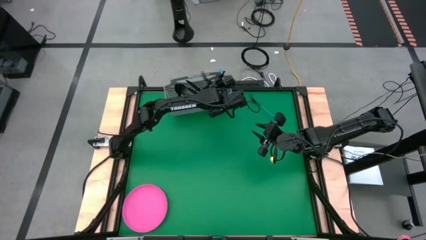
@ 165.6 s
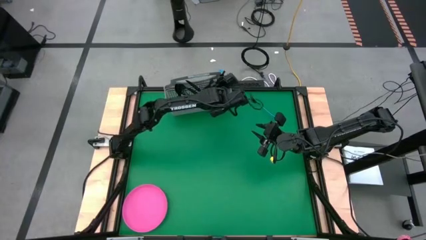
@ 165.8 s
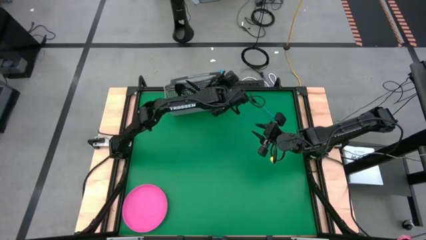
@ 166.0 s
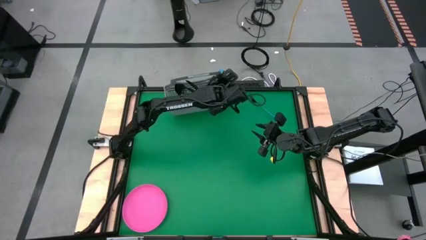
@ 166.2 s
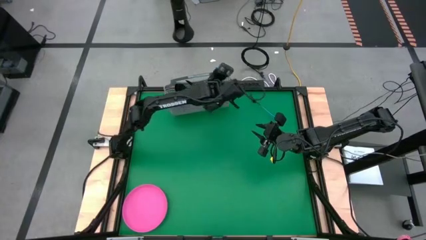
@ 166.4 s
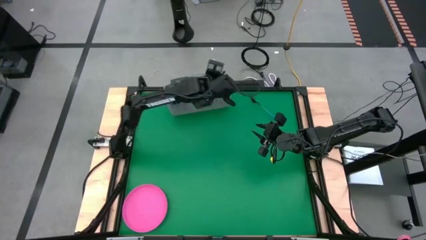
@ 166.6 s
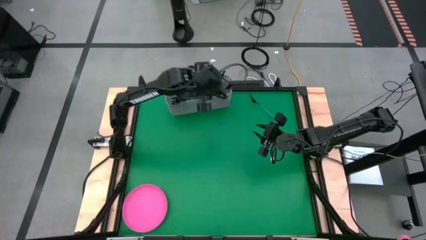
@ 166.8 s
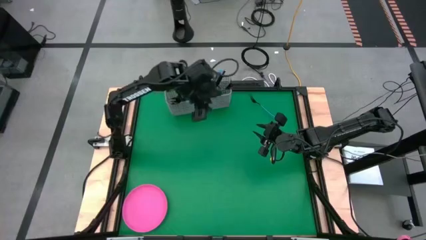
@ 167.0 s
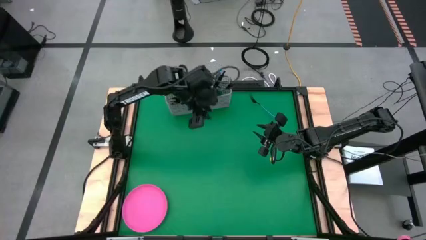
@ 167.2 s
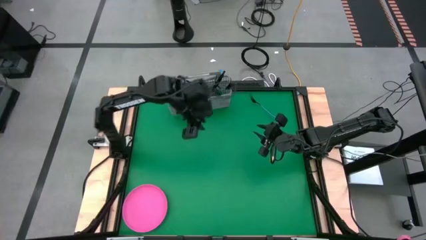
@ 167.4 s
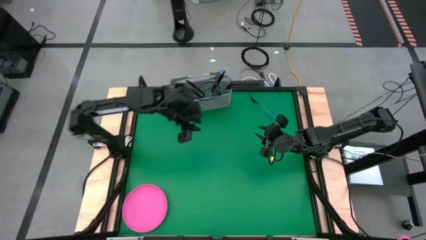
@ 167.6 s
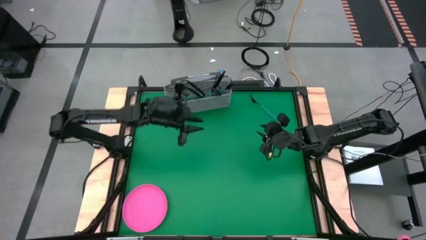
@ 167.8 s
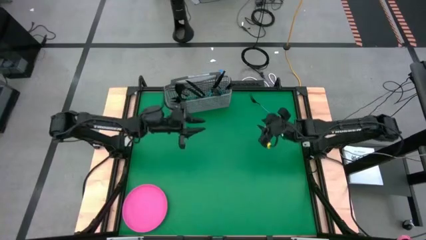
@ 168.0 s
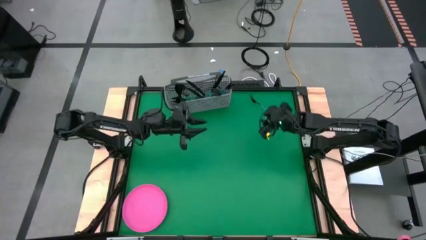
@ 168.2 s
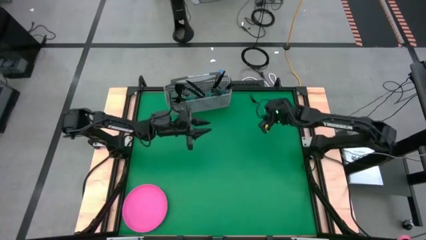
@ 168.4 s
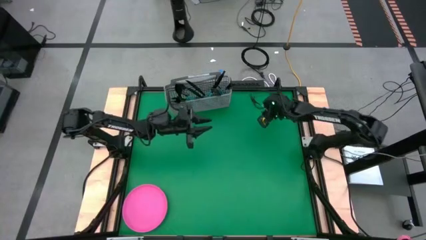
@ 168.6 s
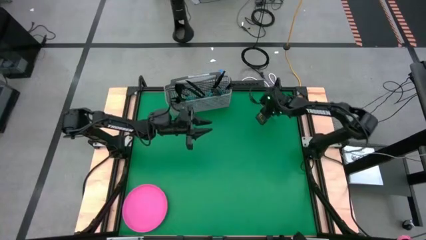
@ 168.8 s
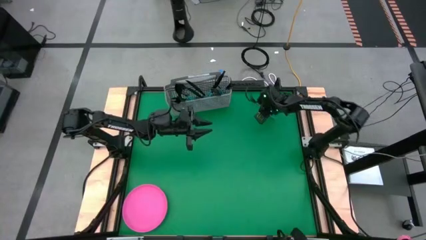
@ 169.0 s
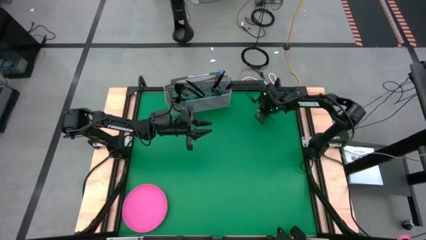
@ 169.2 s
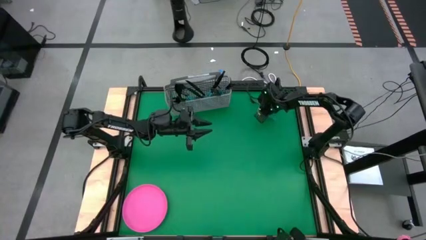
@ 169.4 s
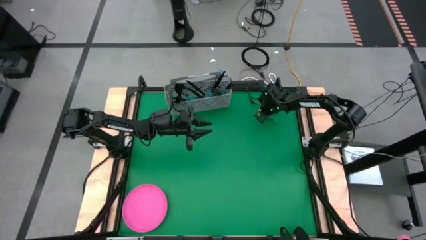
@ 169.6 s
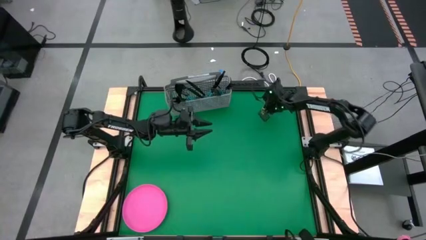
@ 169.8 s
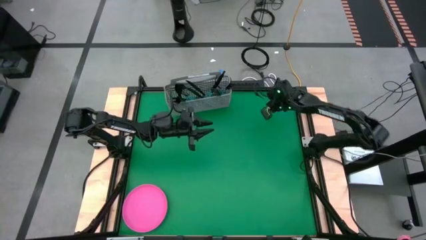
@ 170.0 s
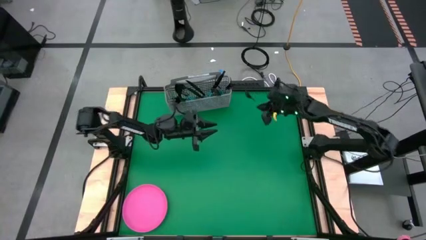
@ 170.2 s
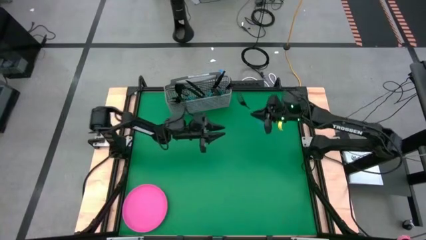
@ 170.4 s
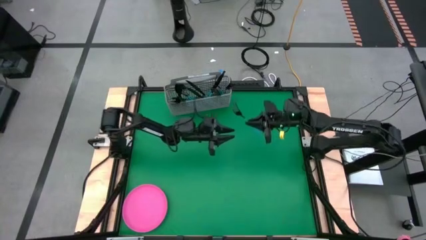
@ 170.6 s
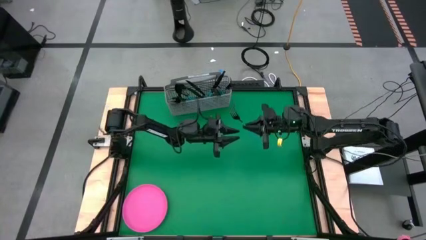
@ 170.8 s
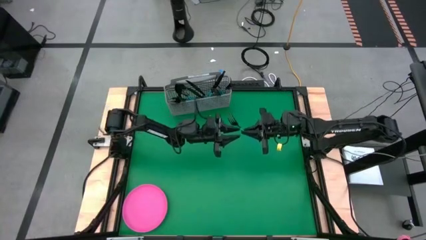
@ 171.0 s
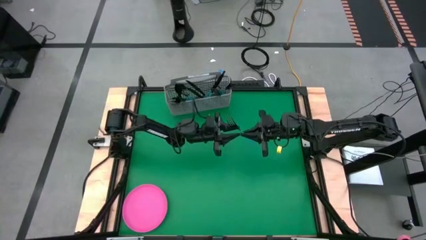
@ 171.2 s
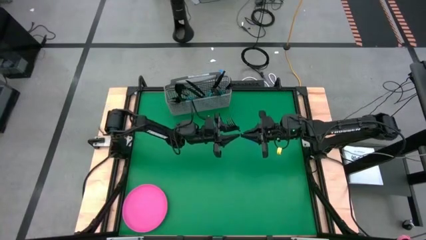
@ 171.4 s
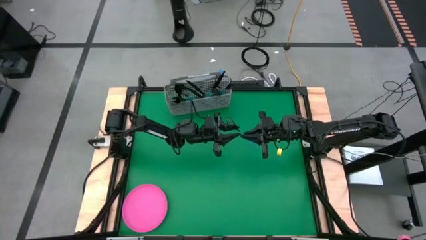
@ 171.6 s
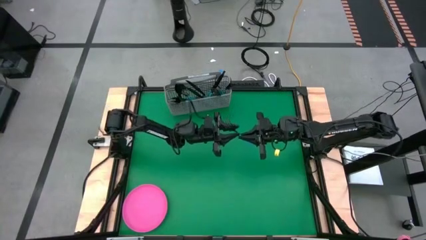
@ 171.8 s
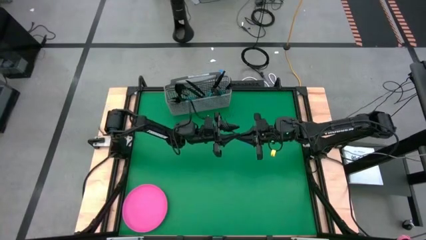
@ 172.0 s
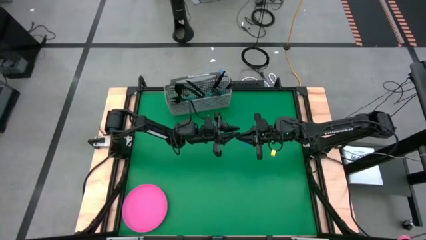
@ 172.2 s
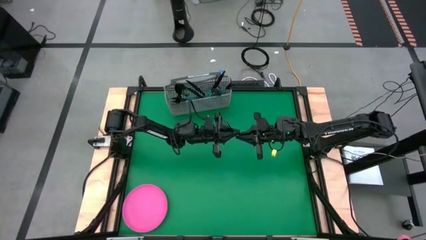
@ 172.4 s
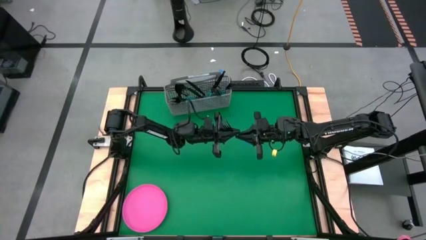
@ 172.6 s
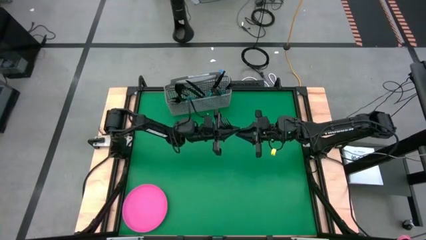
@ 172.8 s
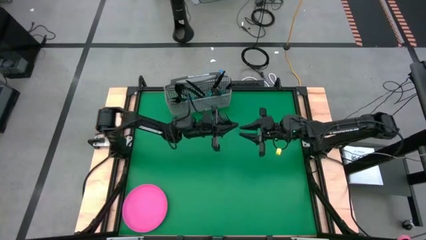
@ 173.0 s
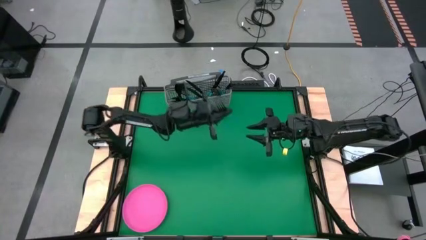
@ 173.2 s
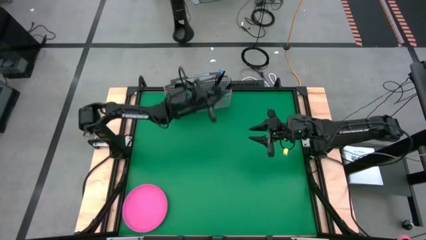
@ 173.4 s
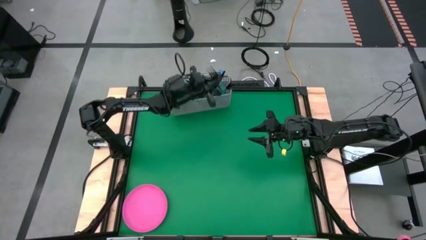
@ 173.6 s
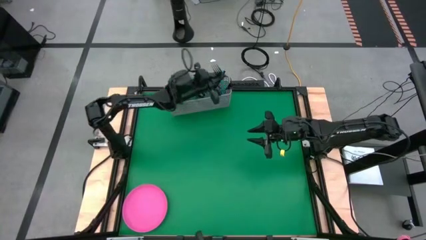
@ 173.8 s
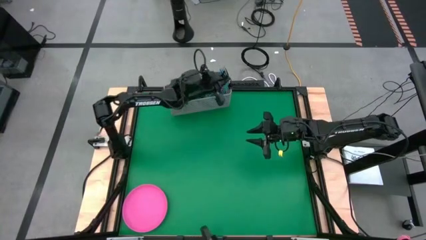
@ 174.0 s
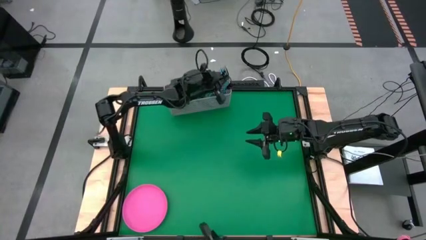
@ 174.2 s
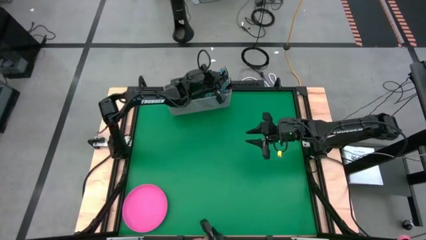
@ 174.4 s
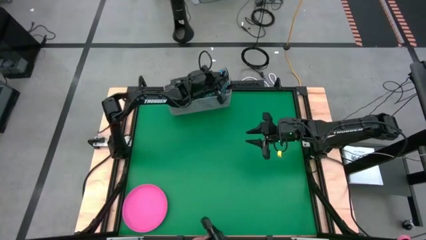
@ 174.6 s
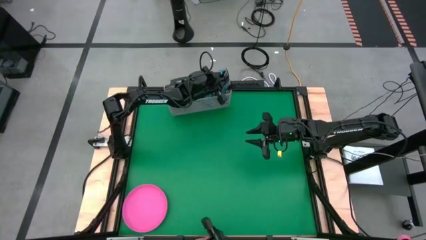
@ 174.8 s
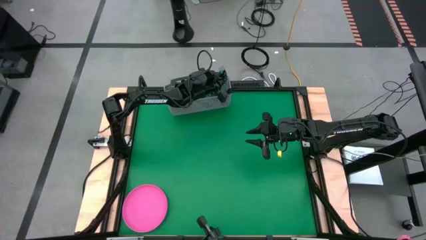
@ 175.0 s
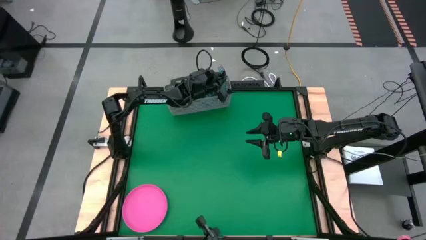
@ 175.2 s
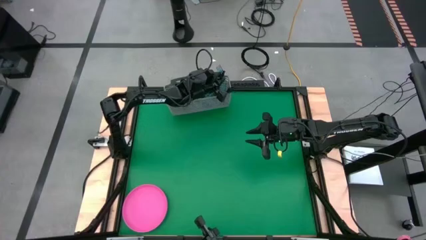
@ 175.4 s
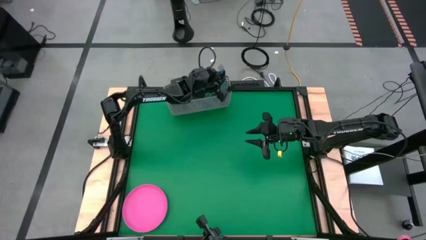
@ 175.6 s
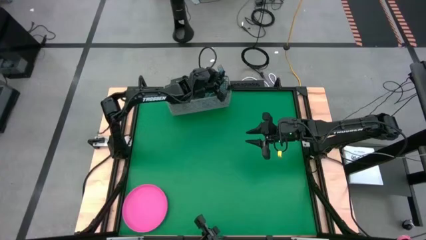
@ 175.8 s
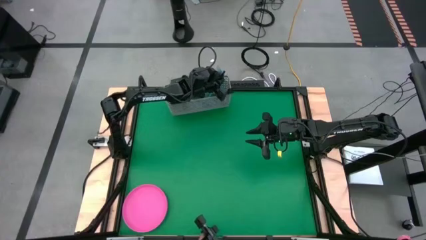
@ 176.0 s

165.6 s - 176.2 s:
Task: Sort silverware
Put the blue fork into the silverware basket

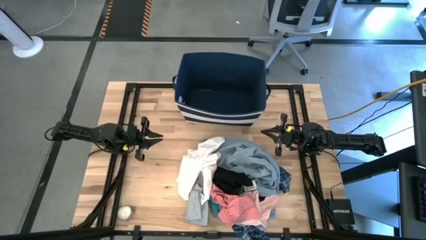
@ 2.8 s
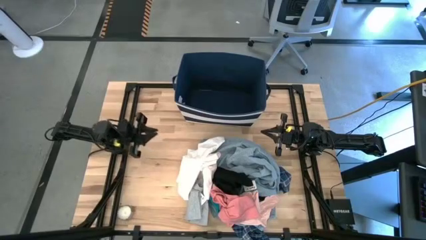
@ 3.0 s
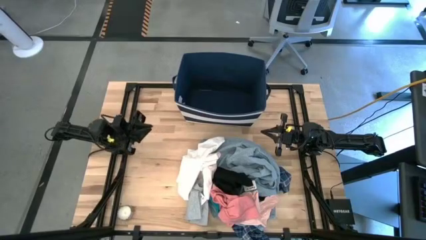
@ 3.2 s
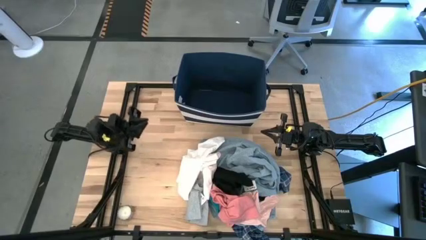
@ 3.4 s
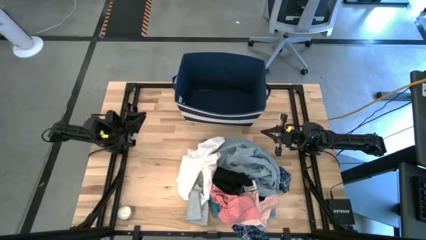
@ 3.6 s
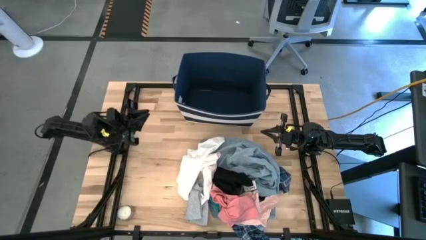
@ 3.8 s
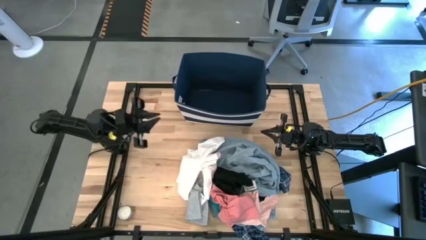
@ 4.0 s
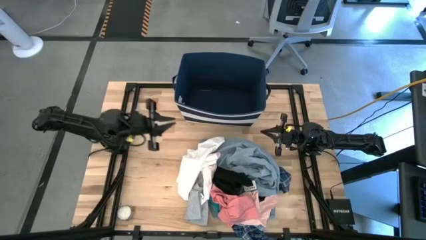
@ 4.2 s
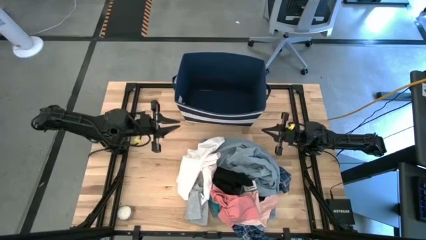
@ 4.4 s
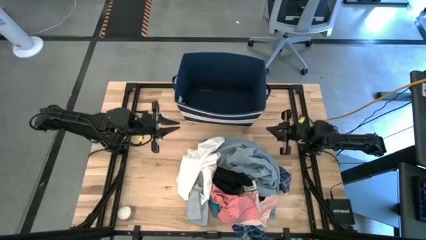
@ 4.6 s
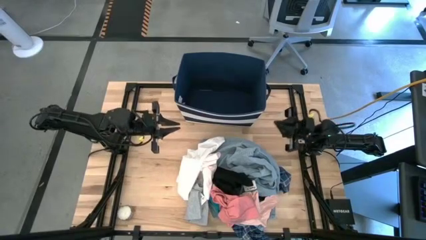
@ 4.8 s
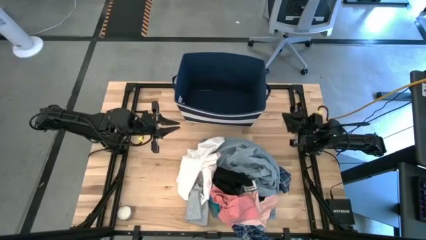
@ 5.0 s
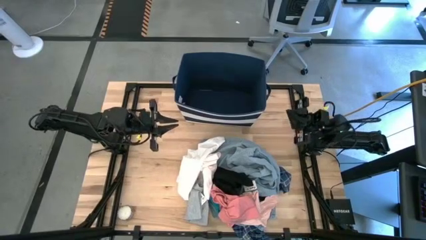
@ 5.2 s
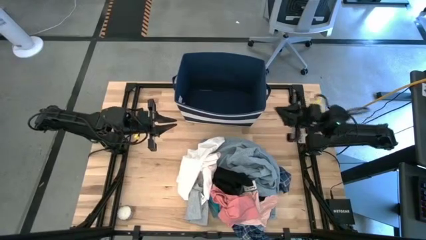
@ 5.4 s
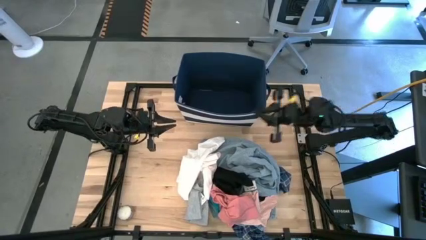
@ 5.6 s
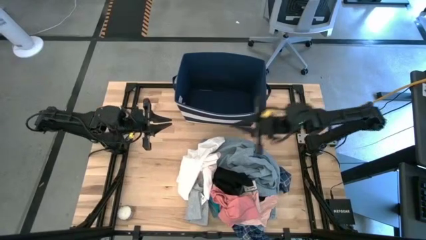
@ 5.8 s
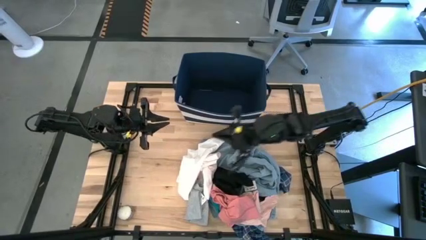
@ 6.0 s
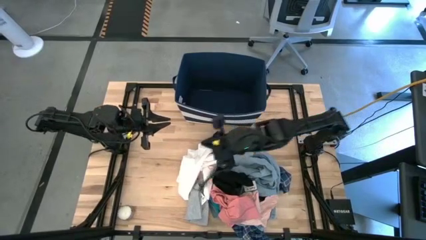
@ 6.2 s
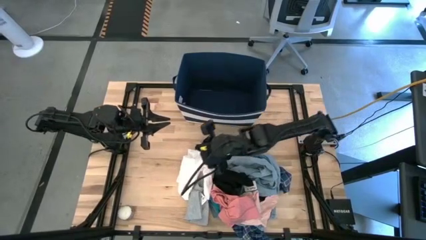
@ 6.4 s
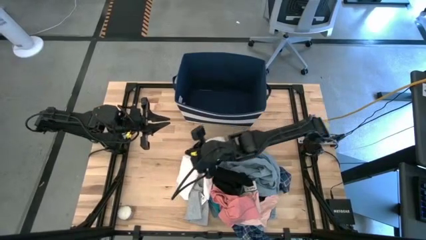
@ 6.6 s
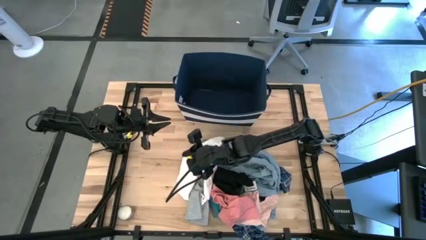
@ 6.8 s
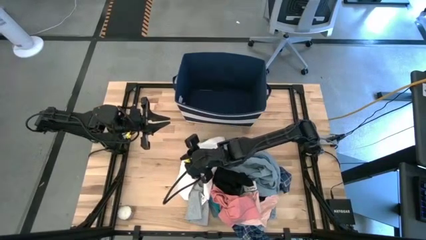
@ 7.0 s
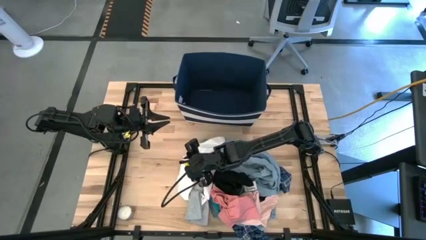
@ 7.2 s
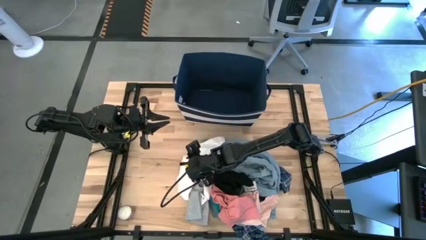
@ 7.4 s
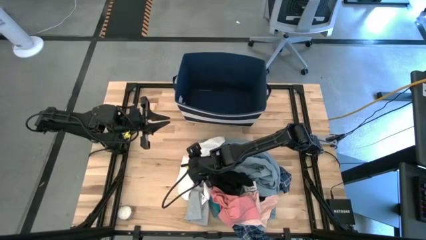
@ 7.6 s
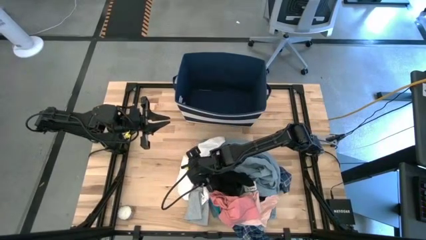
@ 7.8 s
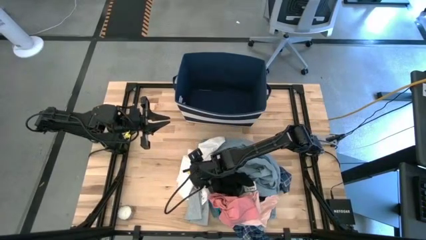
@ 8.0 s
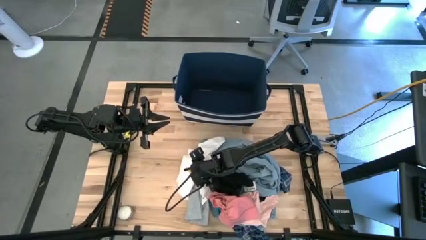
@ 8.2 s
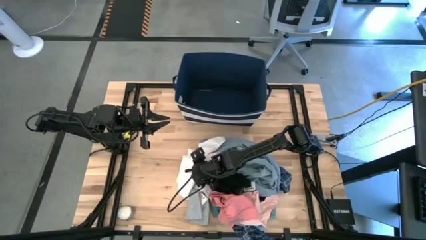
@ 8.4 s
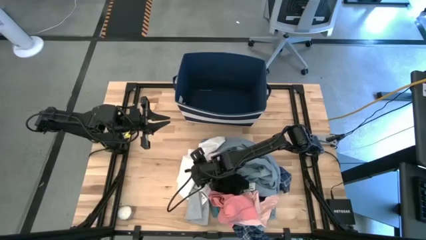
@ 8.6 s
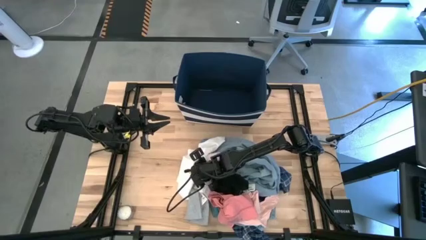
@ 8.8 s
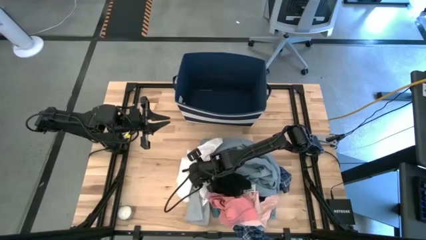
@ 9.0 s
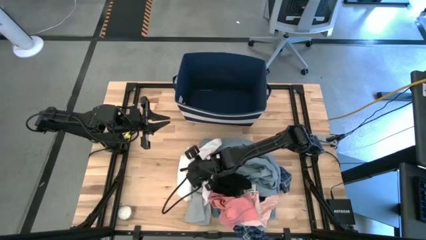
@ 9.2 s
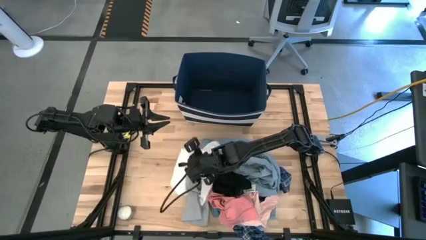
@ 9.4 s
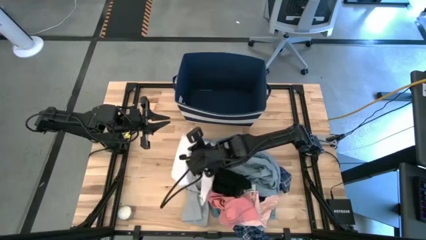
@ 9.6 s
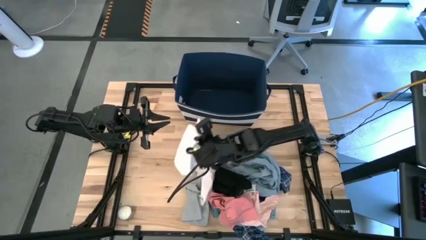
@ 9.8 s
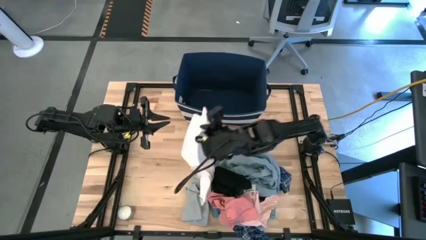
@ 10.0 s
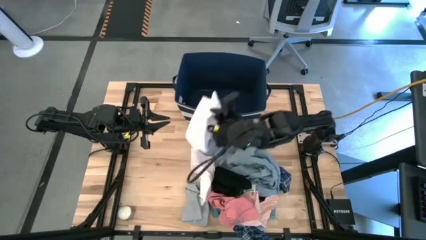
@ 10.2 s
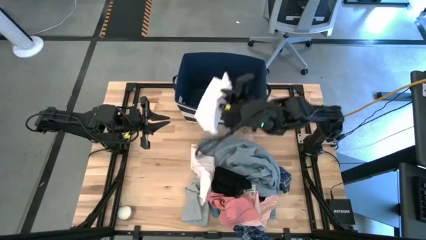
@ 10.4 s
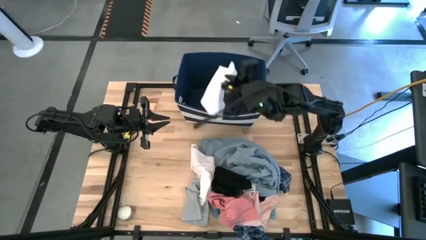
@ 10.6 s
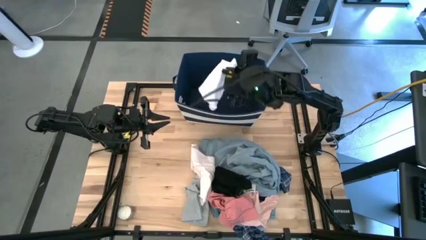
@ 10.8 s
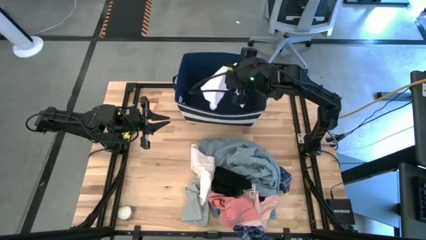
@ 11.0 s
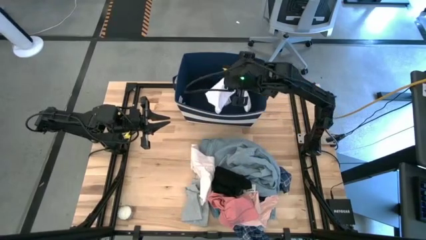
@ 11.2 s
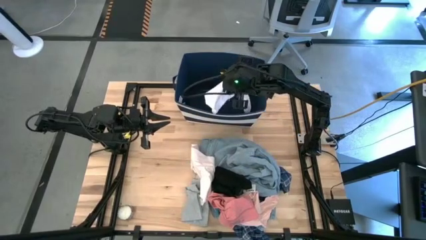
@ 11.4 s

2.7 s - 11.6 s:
Task: Sort clothes
Put the white shorts into the blue bin
